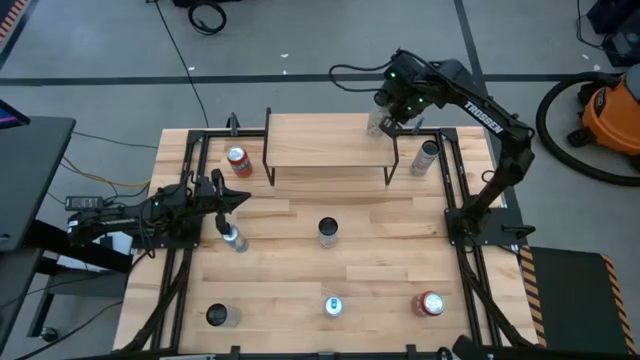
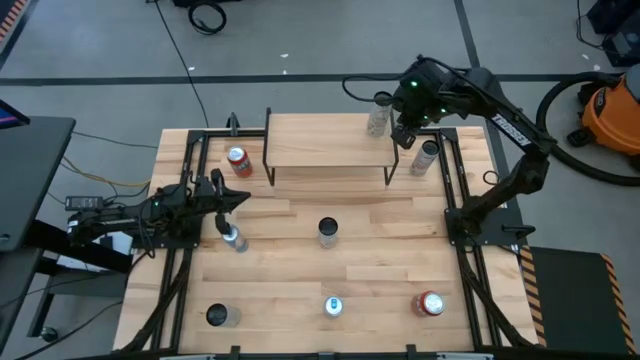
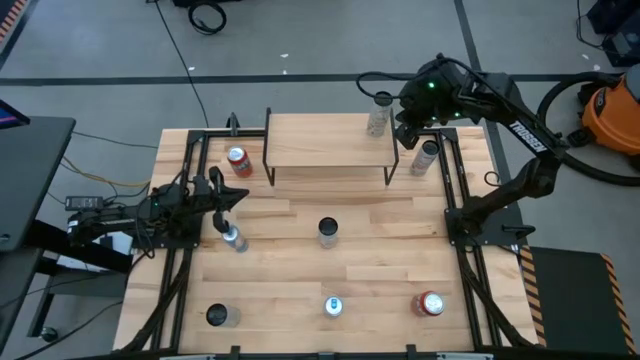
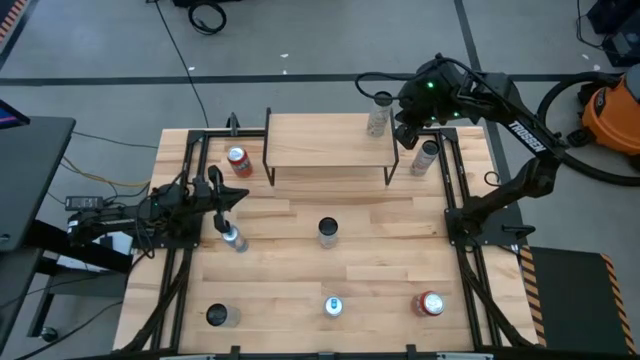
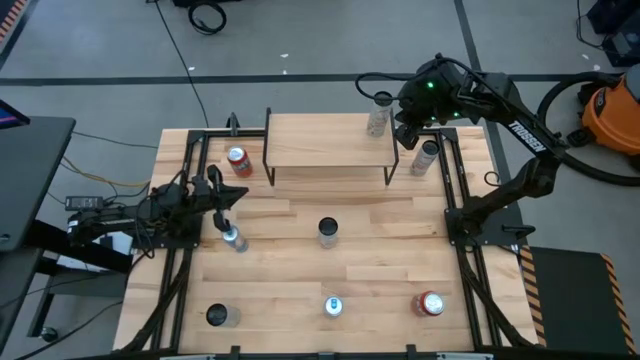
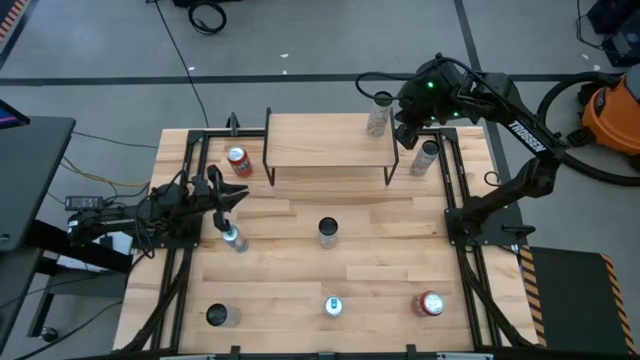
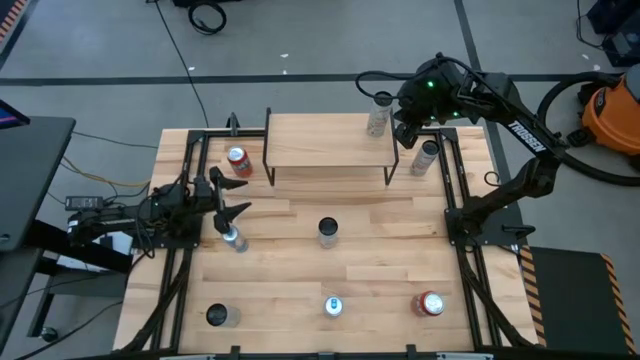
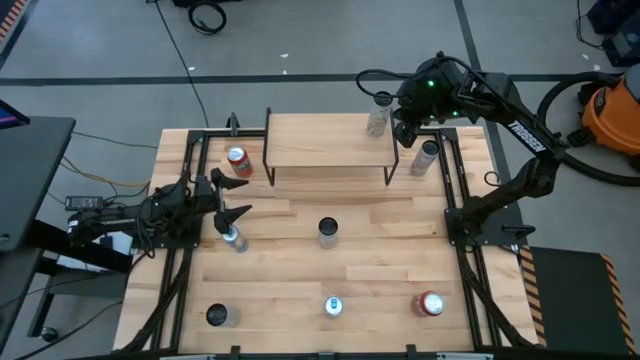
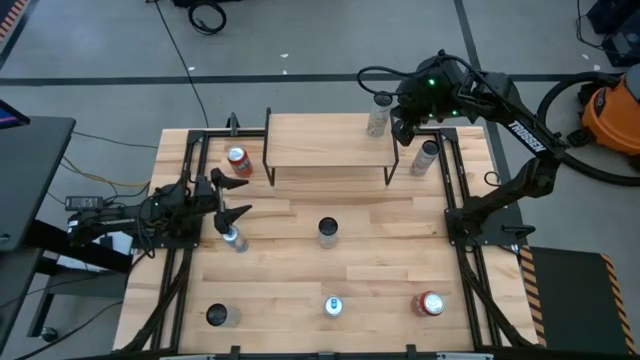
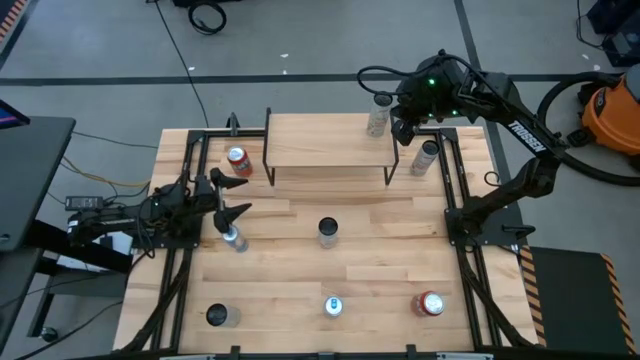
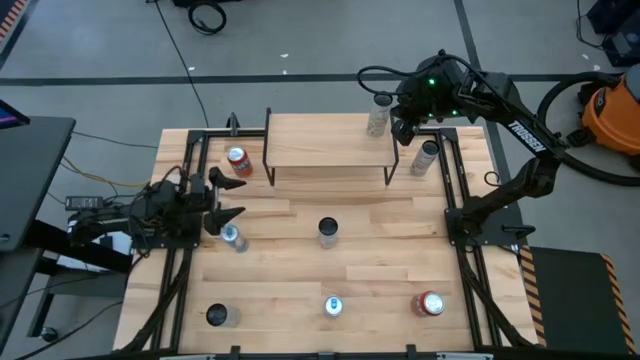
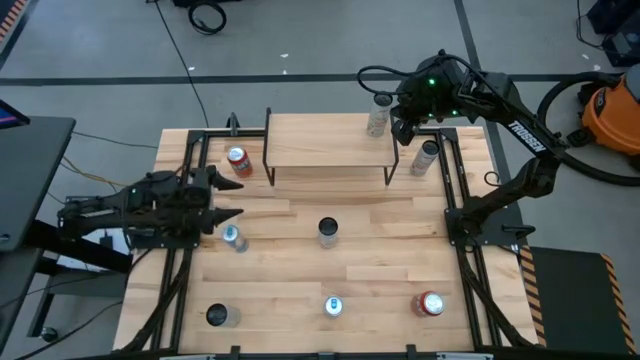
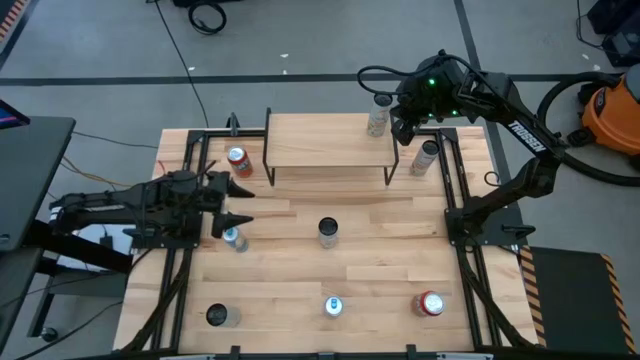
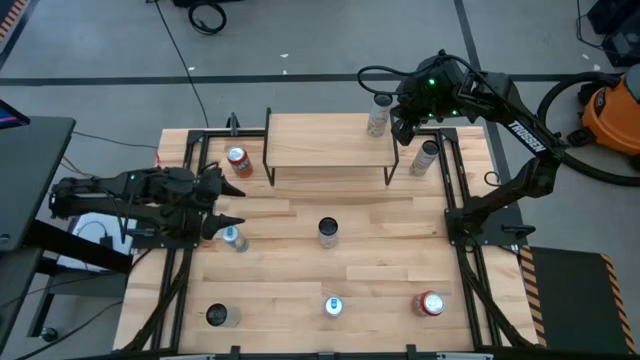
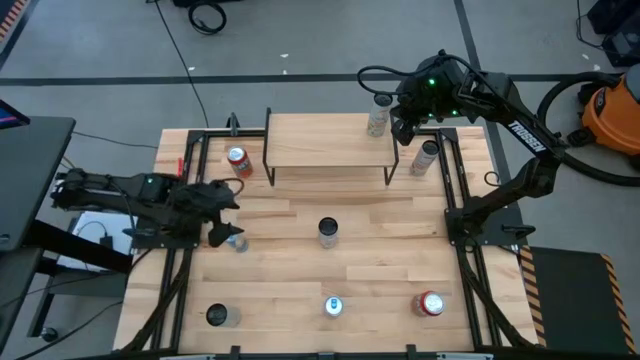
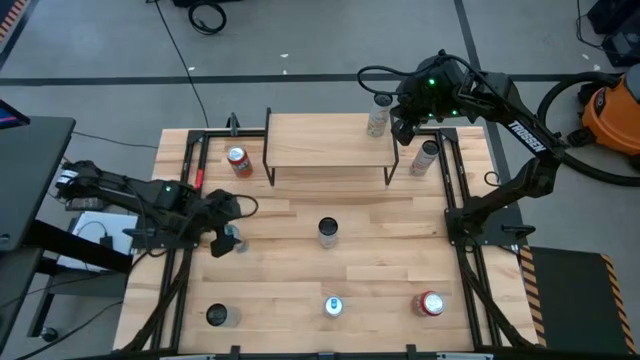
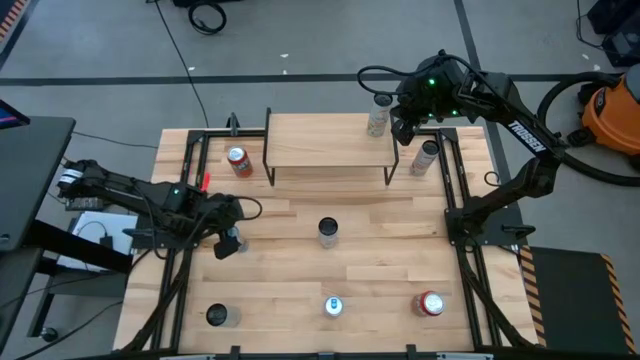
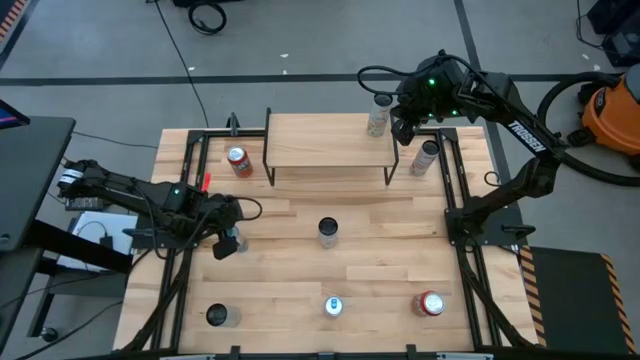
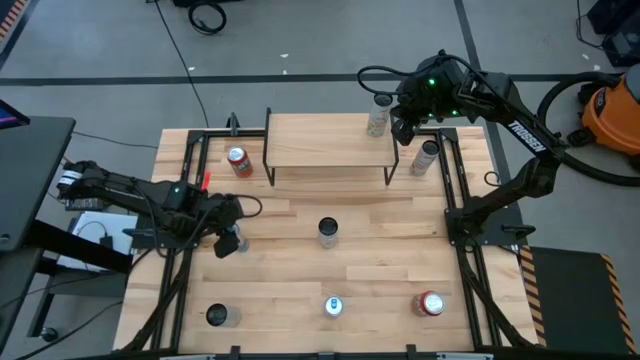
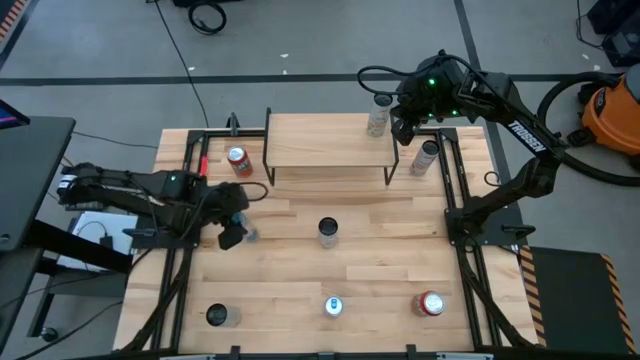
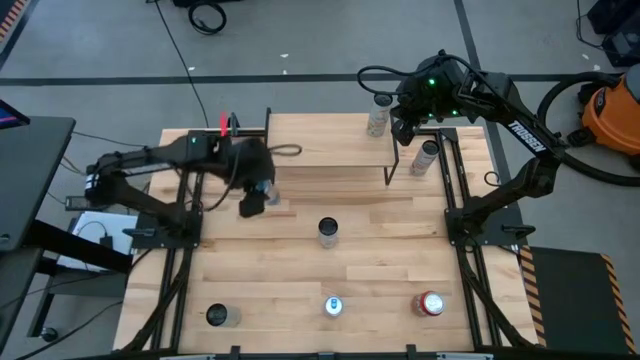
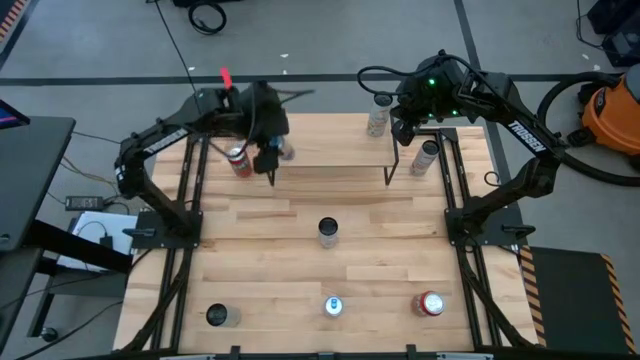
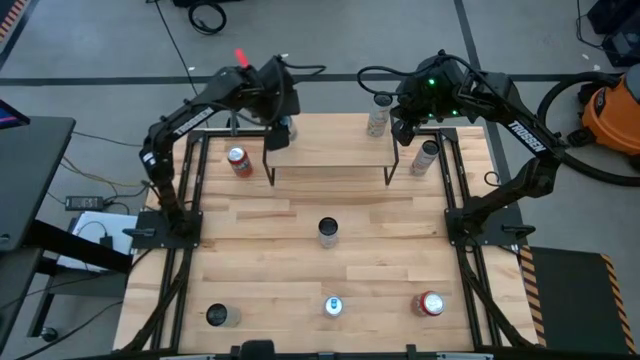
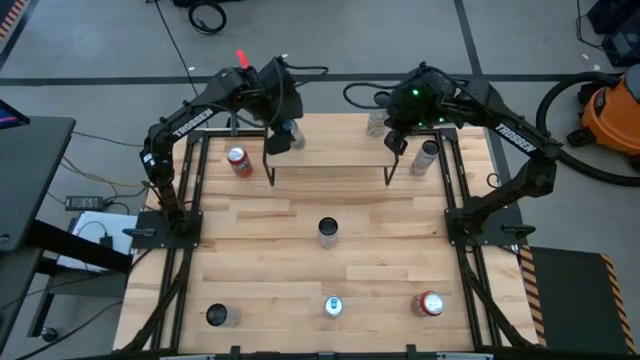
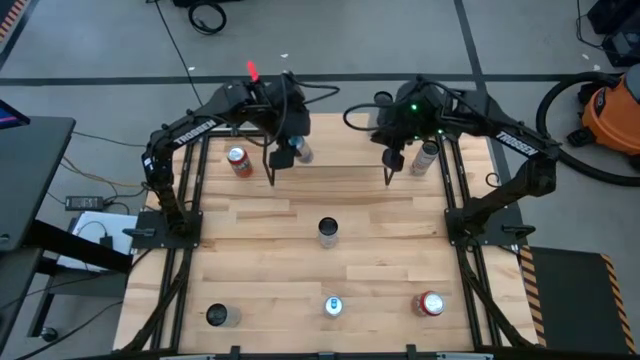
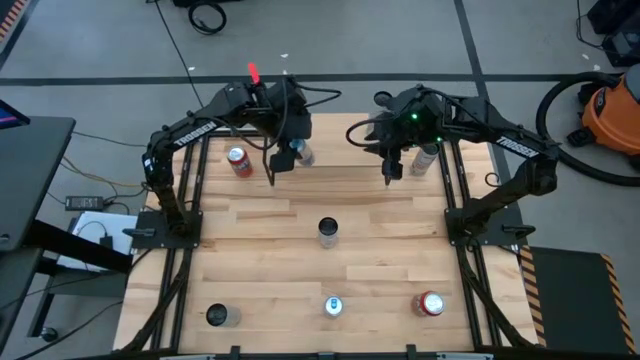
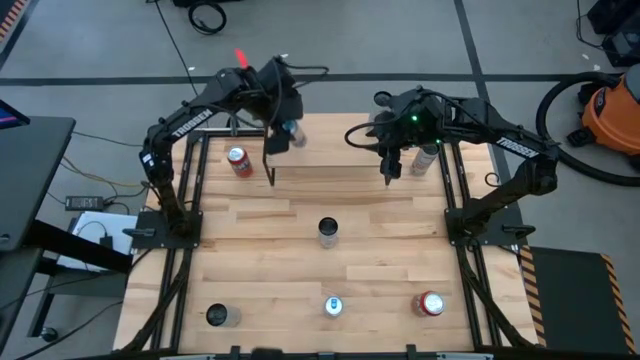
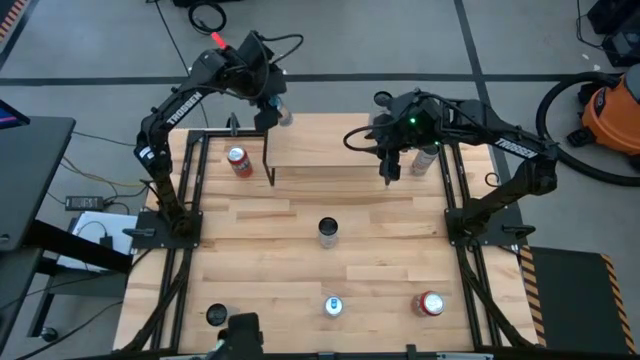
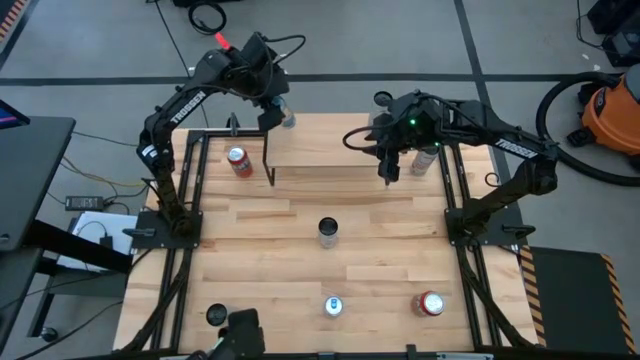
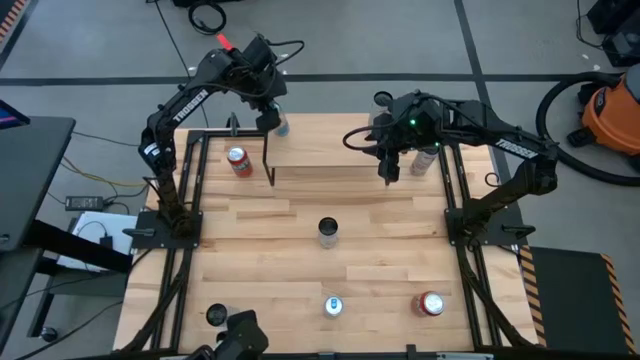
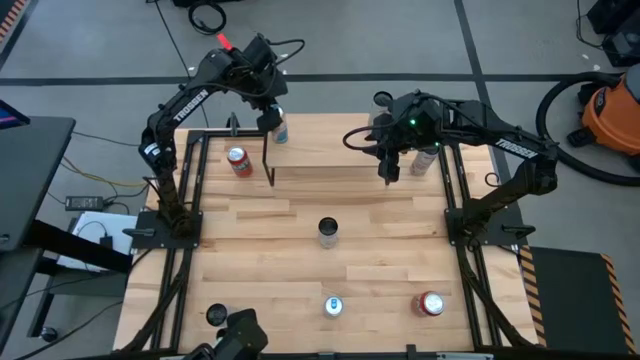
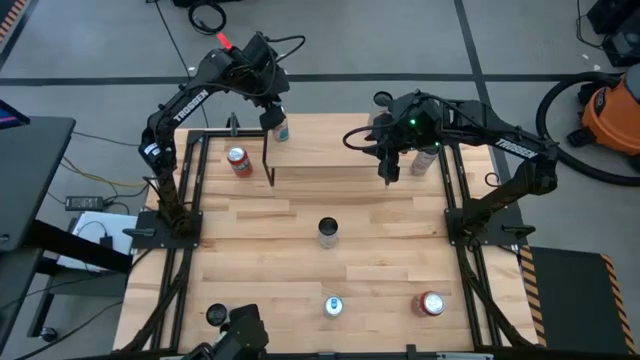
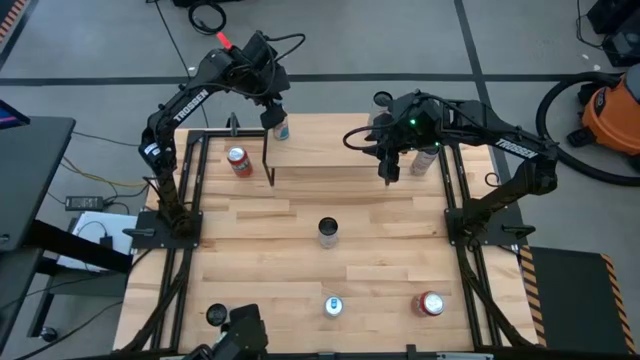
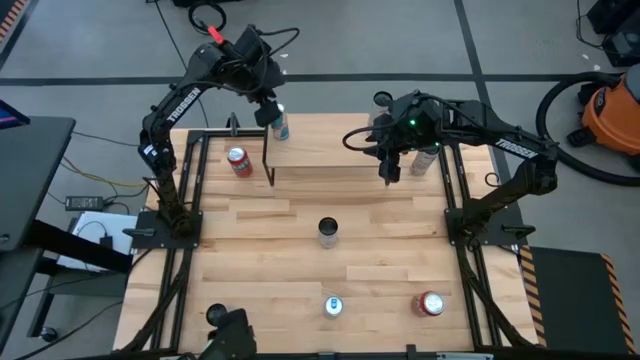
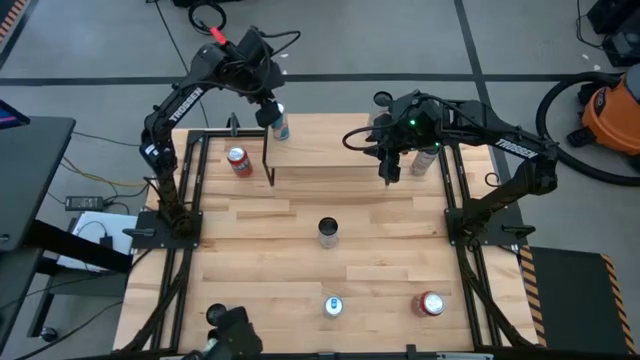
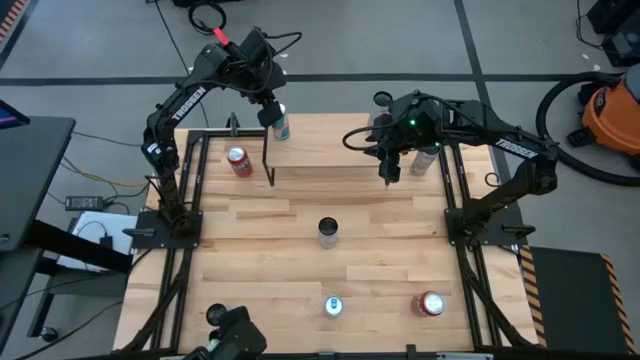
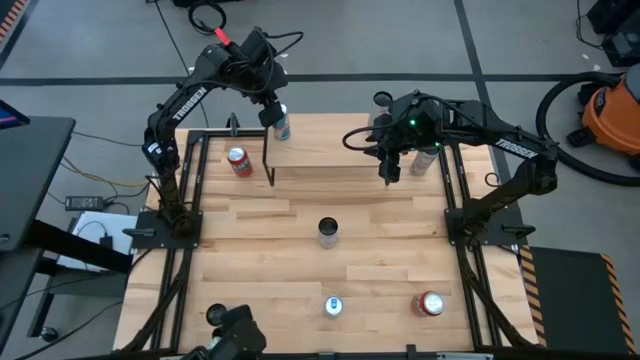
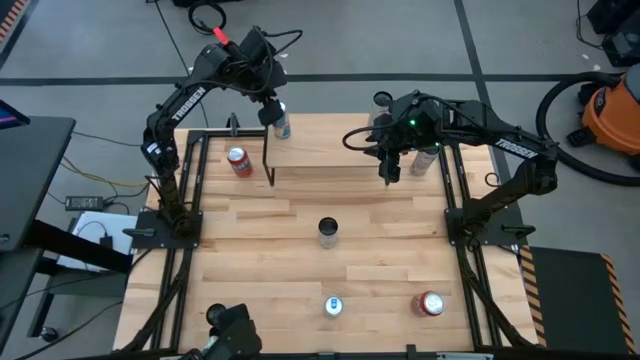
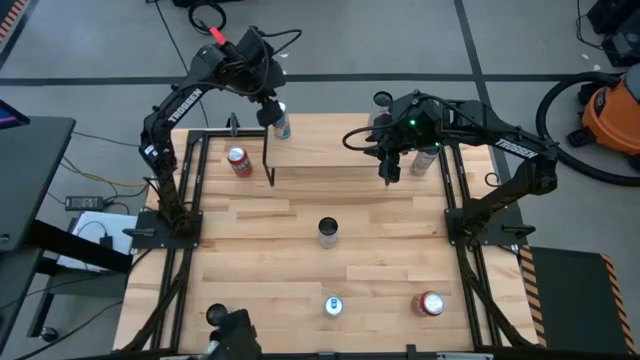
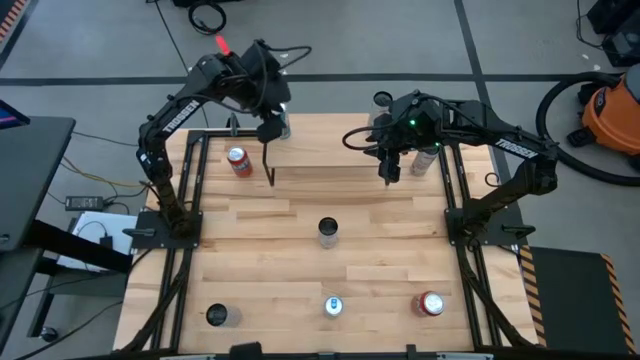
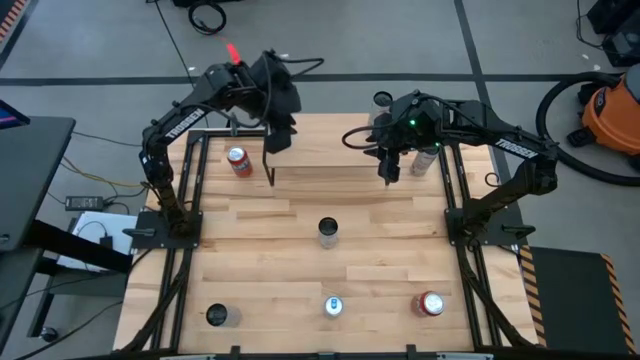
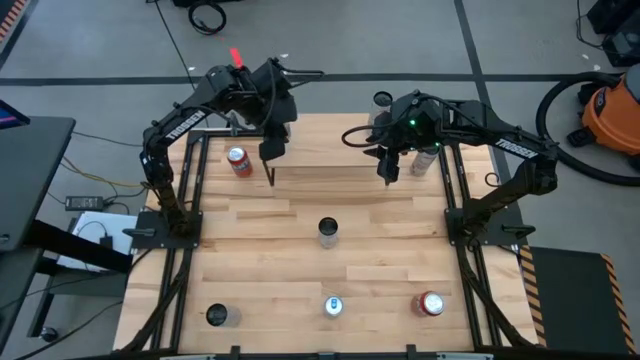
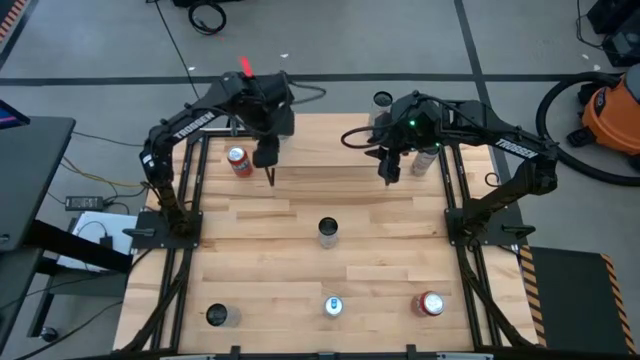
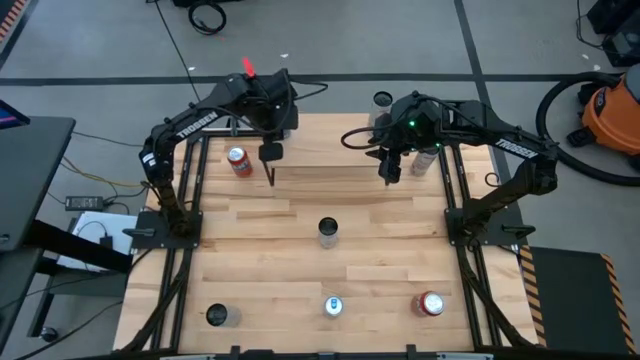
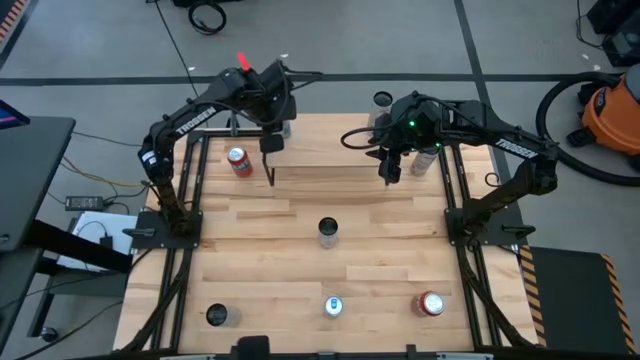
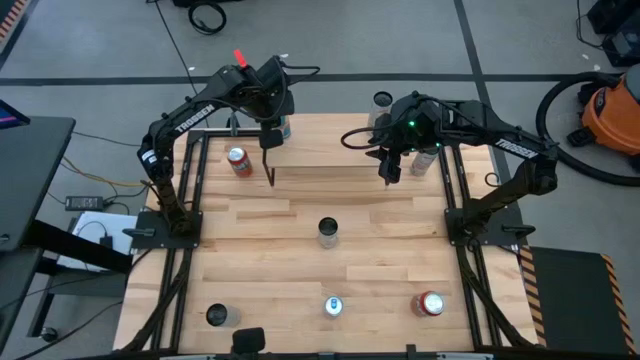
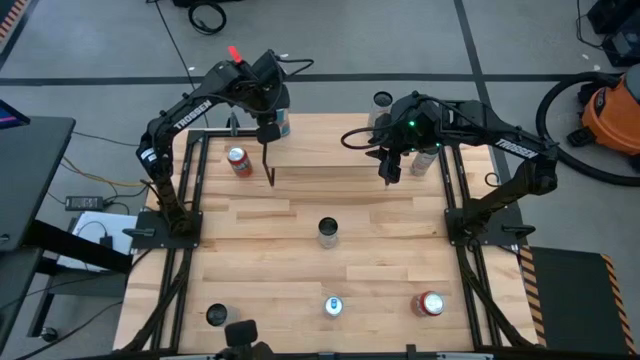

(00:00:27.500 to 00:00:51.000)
Task: Place canned beverage on shelf
Put the top blue soda can on the shelf
